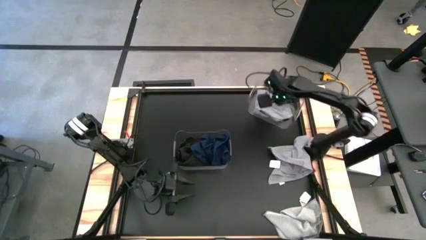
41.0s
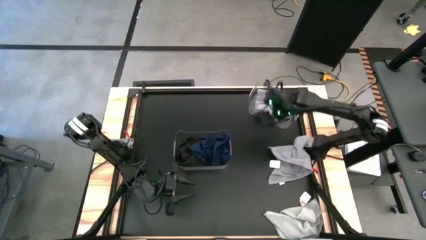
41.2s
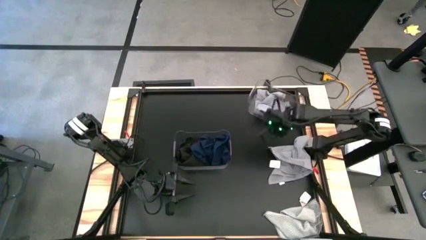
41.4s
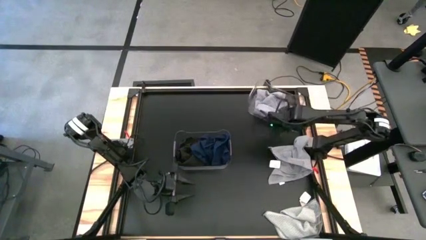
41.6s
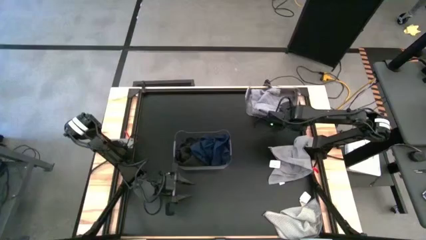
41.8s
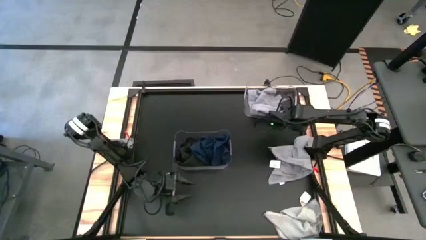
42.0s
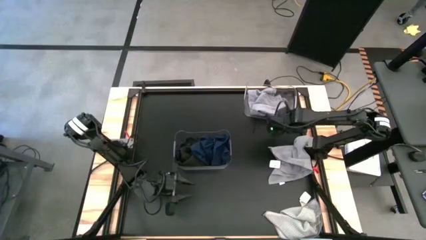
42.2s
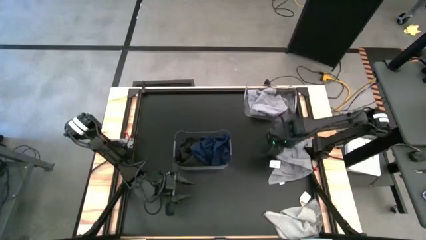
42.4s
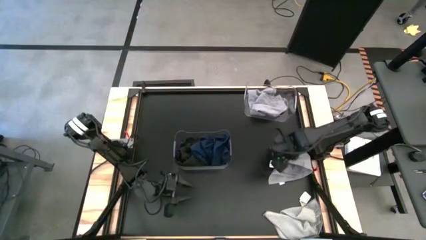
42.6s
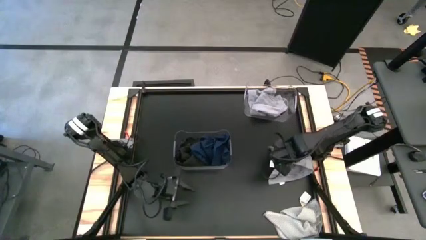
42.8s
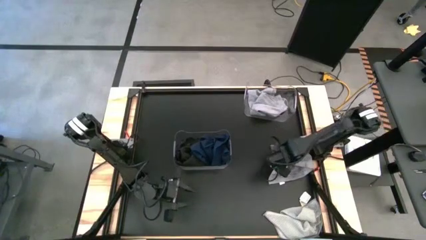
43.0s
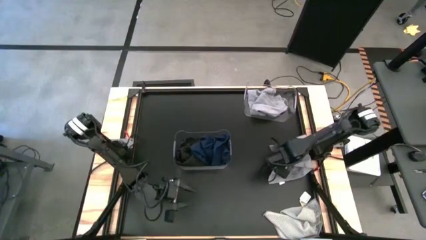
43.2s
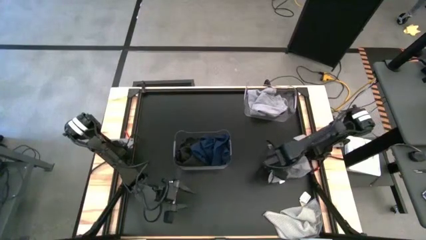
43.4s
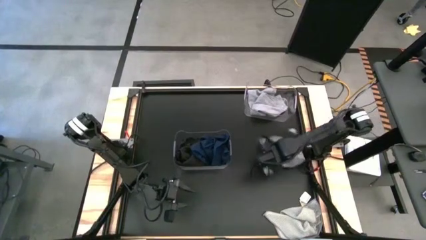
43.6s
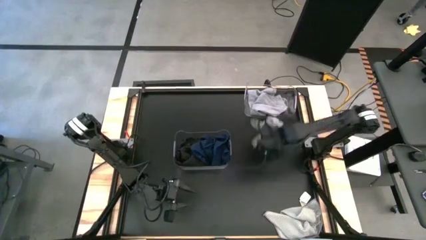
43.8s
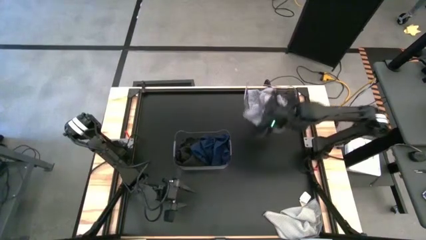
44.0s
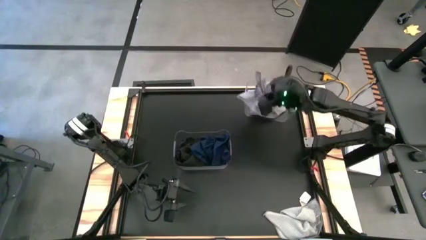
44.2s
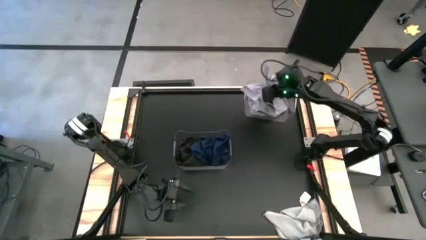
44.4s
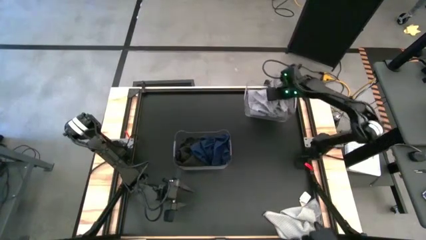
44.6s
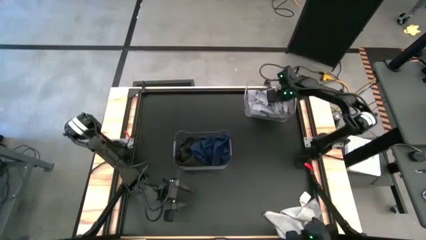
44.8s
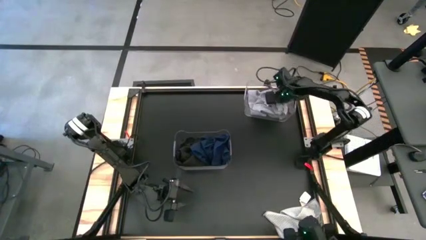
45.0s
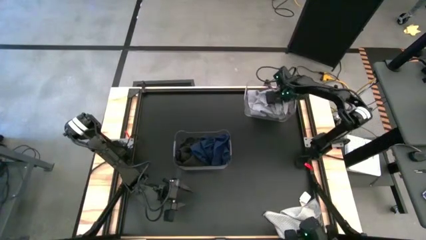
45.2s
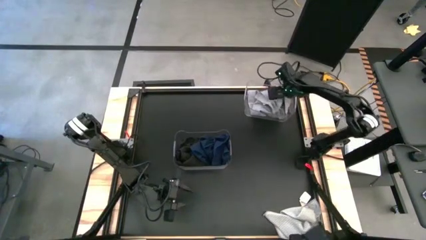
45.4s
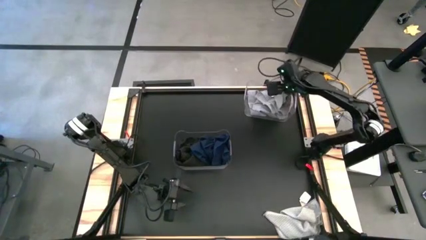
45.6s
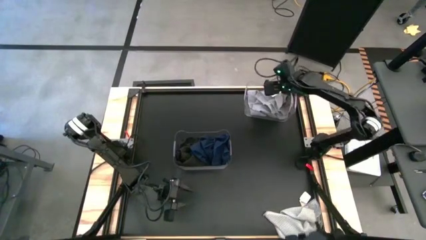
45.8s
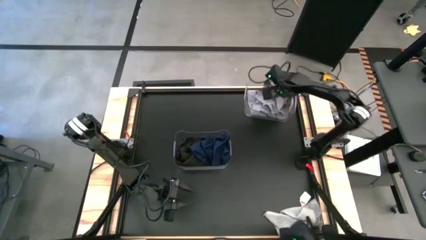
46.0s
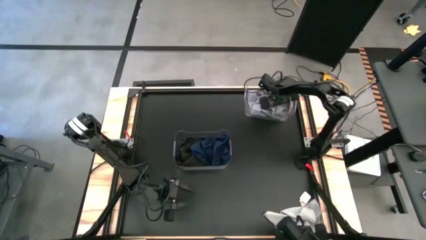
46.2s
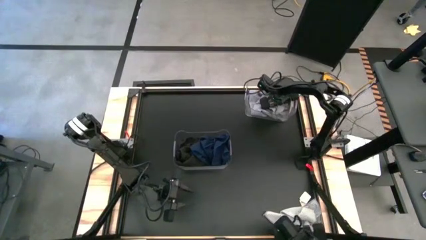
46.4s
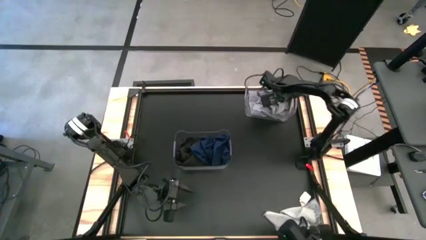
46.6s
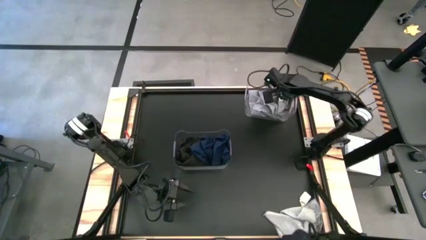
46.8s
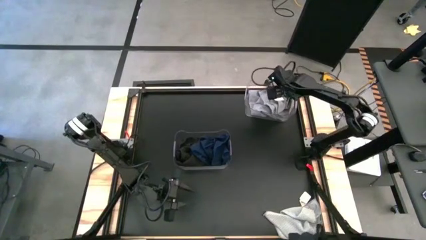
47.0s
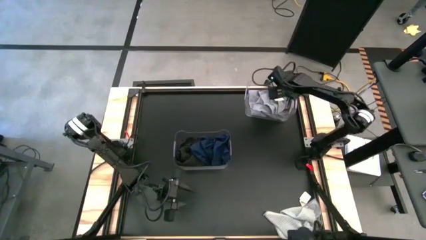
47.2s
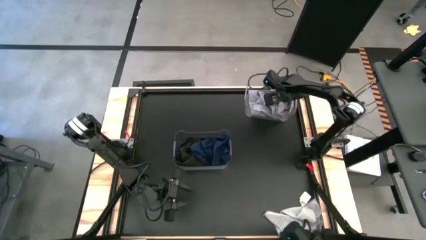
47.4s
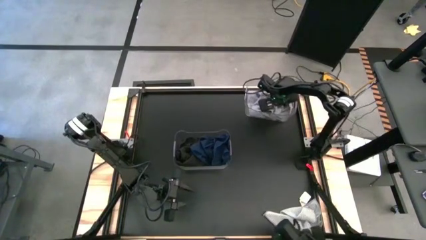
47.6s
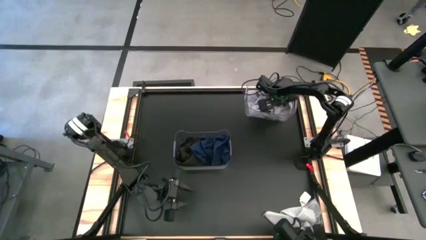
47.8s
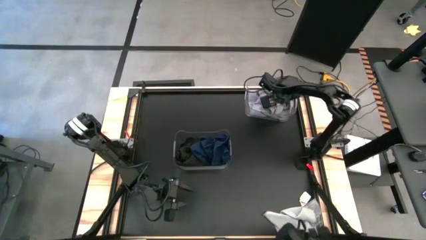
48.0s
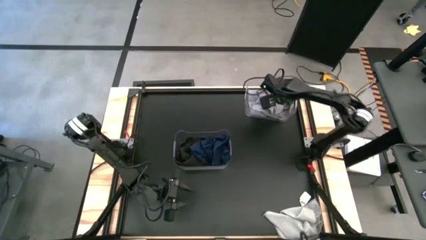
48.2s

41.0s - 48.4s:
Task: Sort towels by color in basket
Put the gray towel into the top right transparent bin

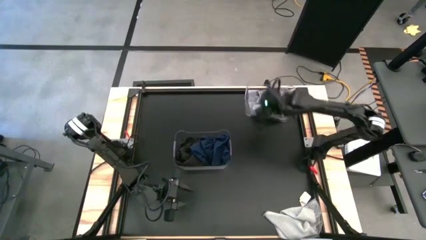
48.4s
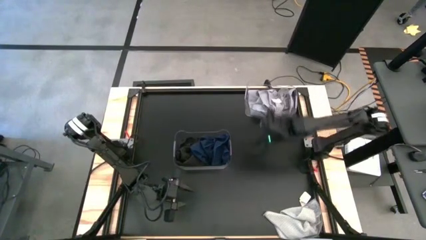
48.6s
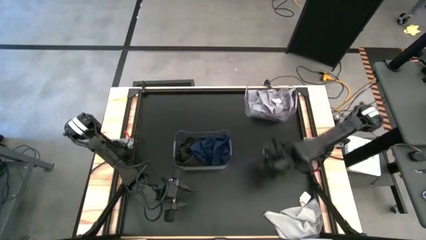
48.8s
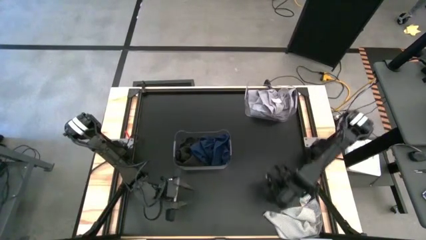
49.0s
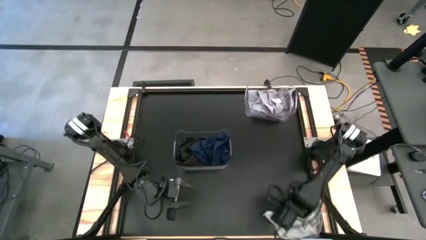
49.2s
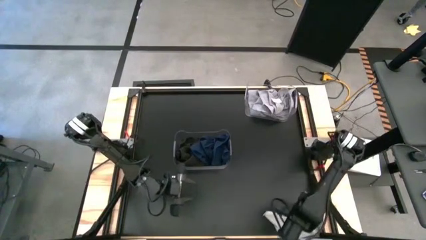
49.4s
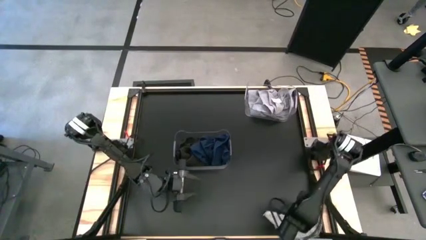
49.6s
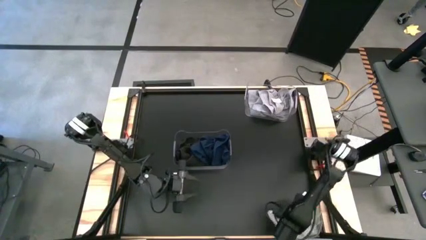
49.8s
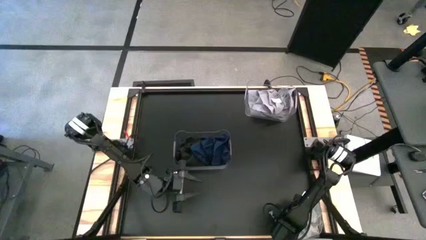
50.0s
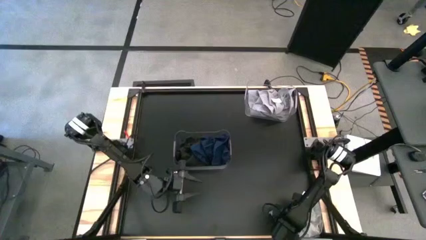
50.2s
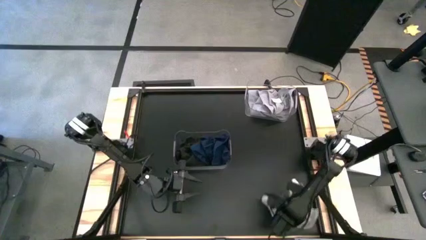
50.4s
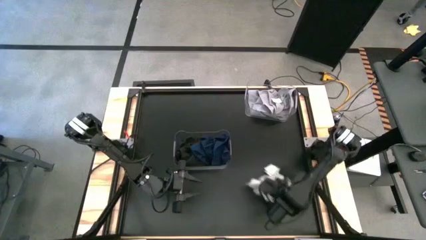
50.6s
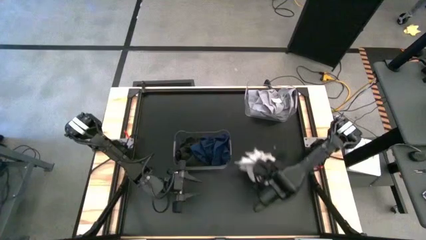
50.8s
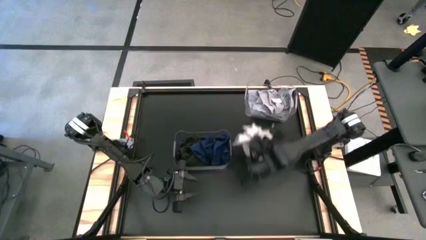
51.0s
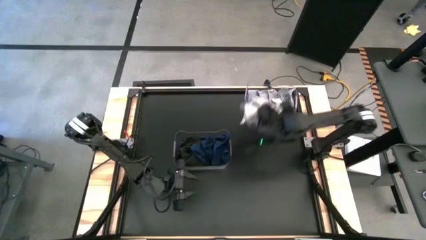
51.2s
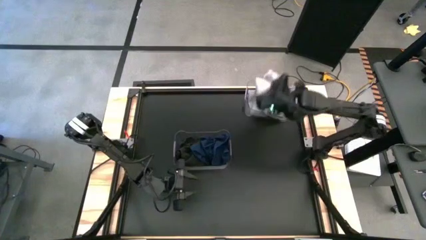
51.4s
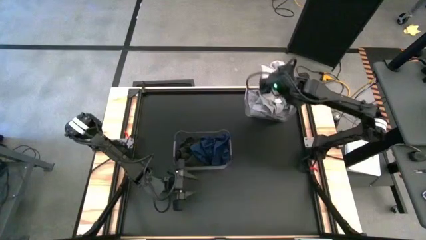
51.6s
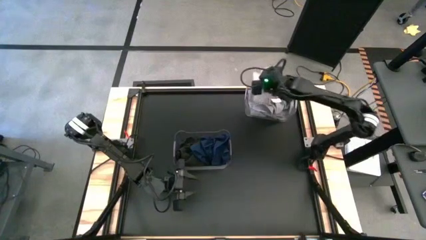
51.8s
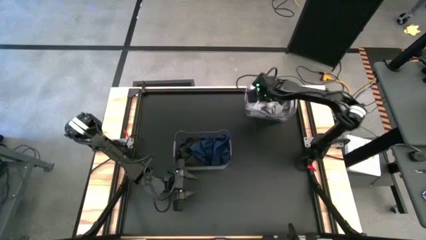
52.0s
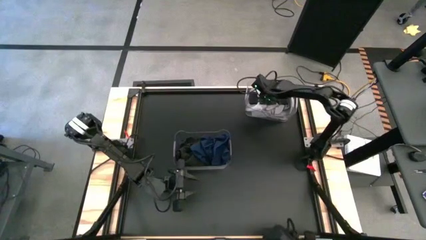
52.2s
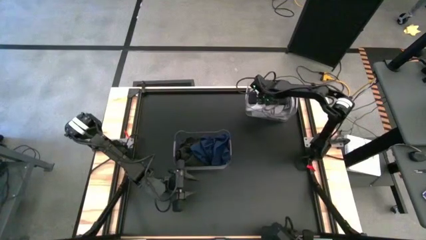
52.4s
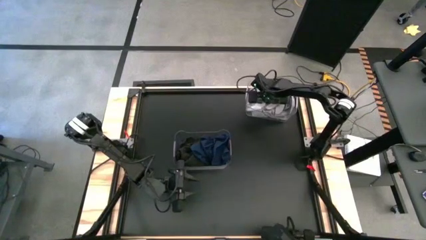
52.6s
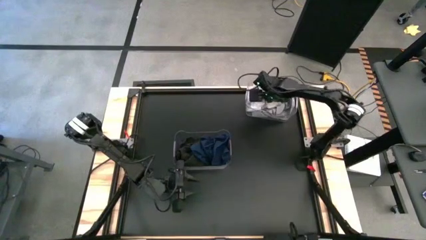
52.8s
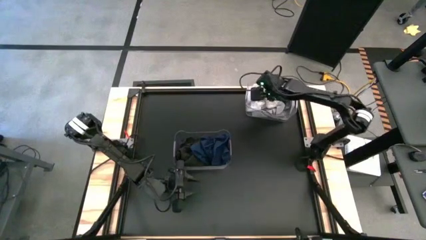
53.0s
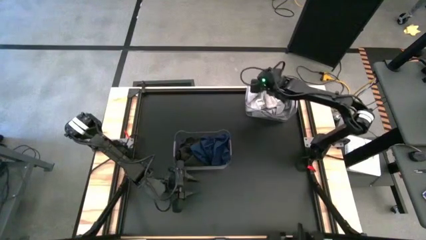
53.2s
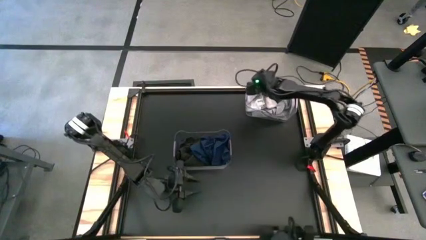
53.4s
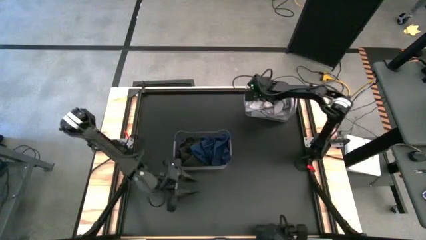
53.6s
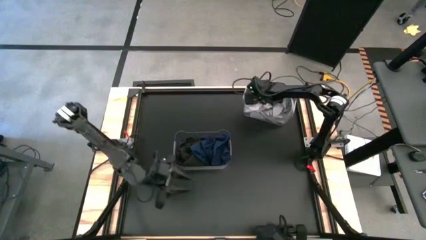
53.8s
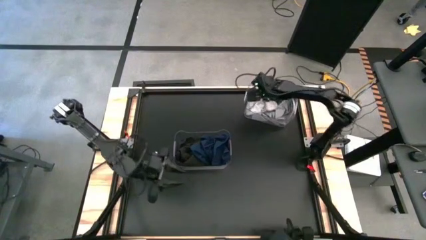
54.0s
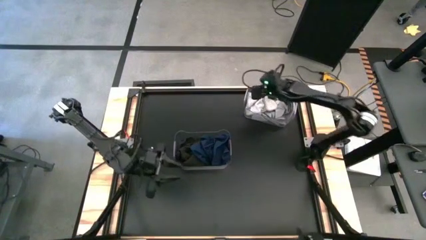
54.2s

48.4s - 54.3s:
Put the white towel into the top right transparent bin

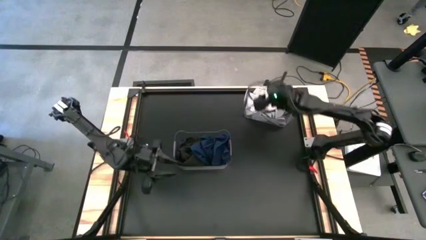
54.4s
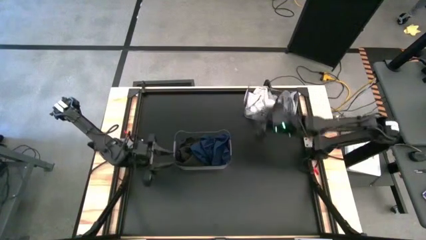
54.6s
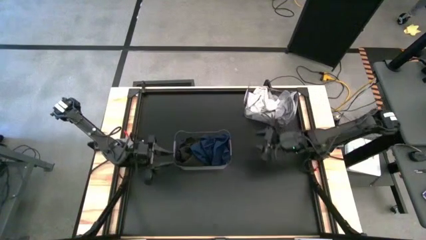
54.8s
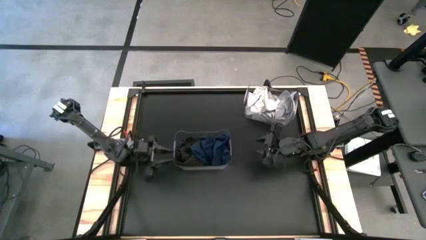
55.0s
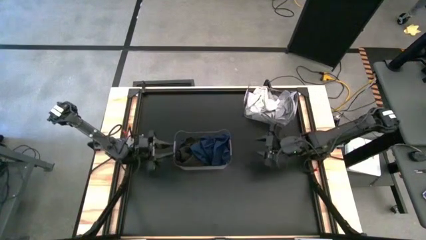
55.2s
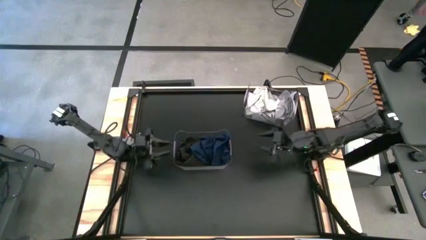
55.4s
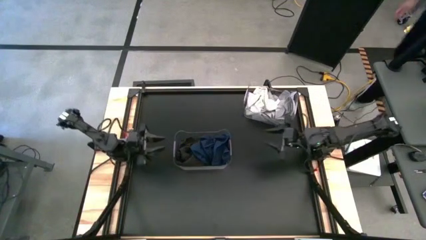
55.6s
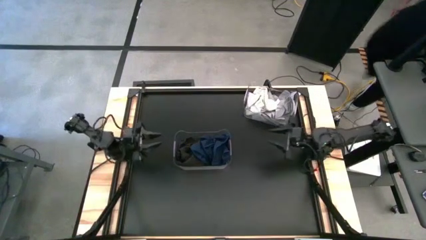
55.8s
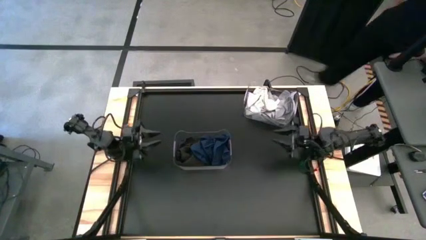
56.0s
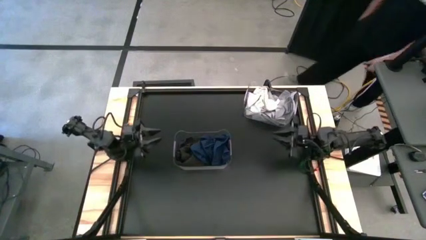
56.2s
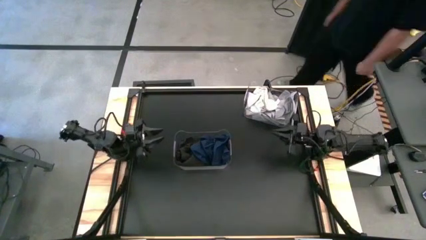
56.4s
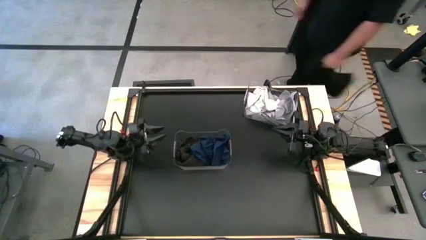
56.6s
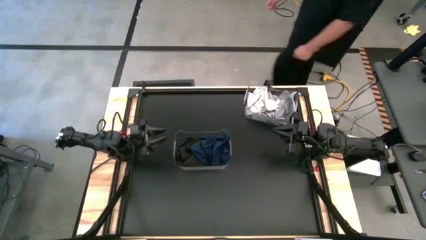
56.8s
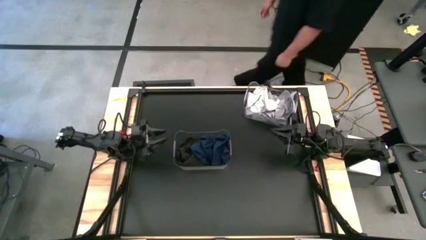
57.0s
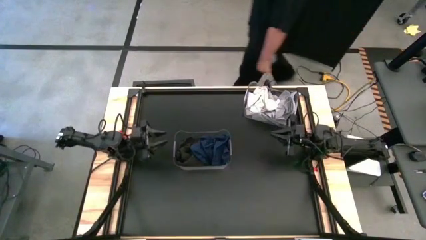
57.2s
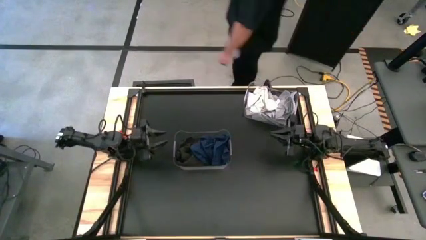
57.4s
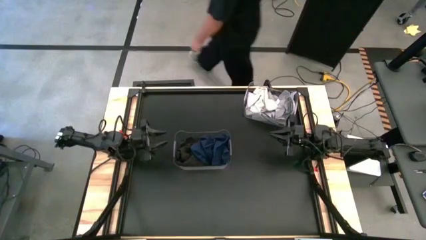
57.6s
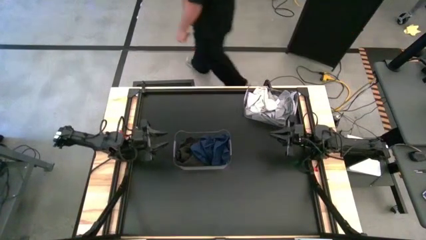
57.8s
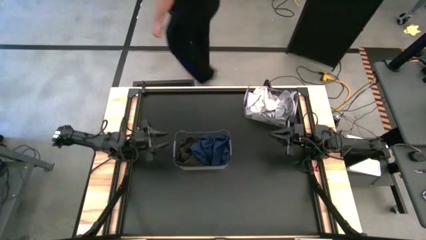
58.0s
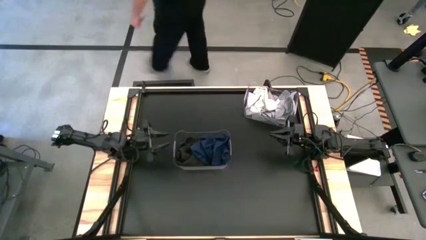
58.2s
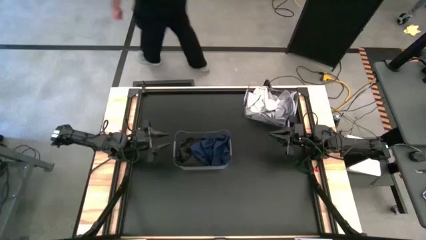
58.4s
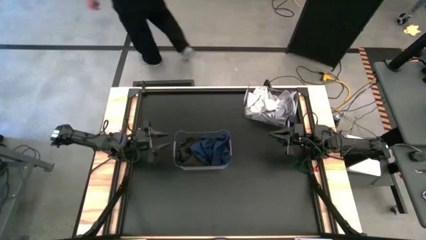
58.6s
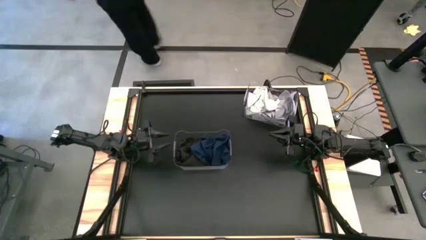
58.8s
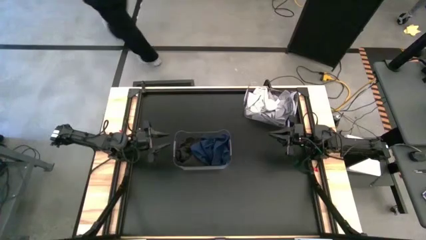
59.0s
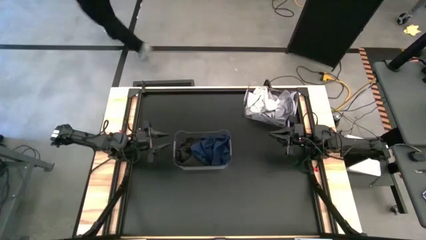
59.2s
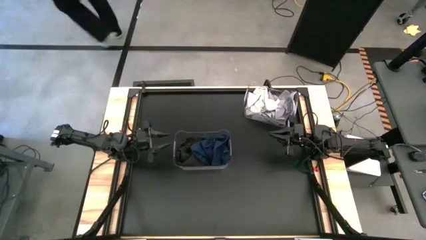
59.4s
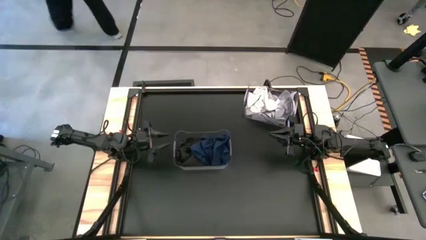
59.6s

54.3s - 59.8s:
Return to home position
